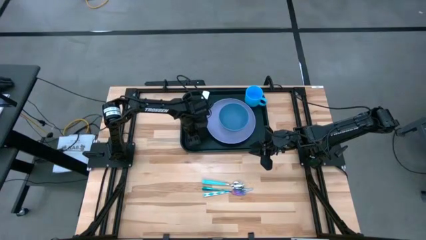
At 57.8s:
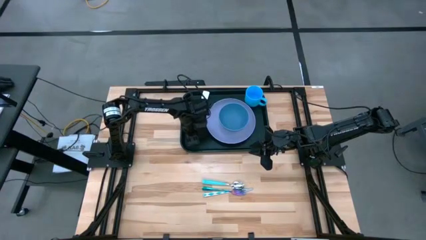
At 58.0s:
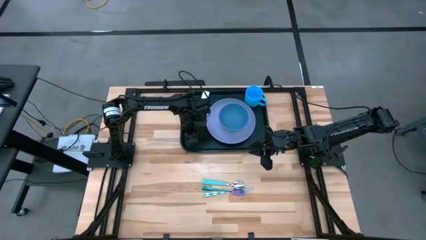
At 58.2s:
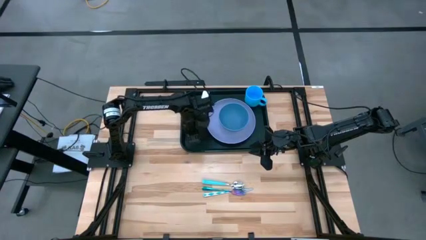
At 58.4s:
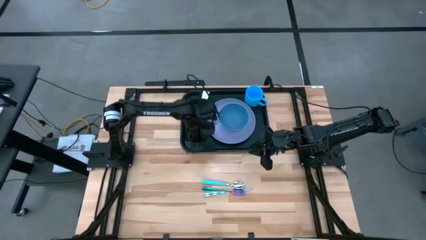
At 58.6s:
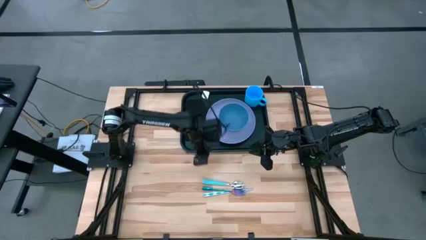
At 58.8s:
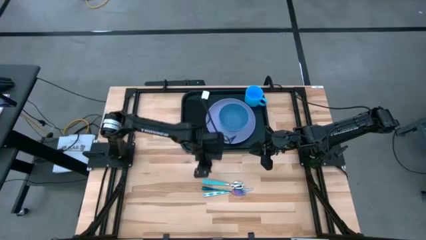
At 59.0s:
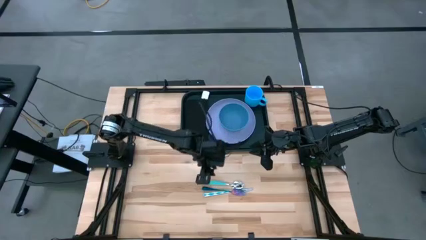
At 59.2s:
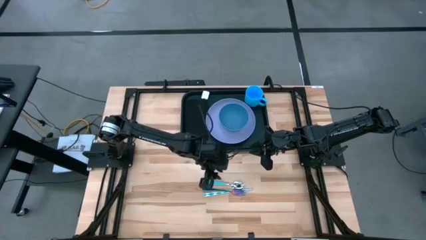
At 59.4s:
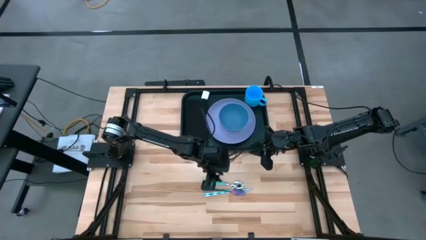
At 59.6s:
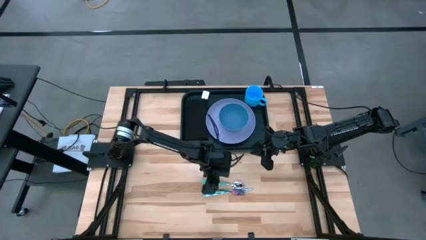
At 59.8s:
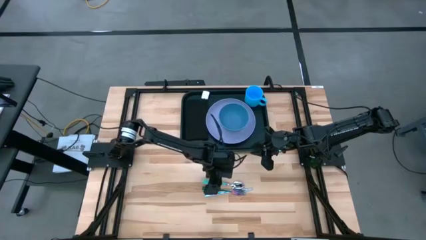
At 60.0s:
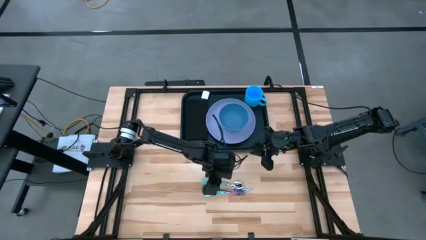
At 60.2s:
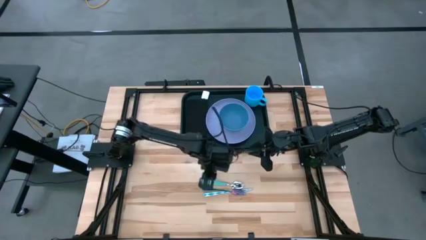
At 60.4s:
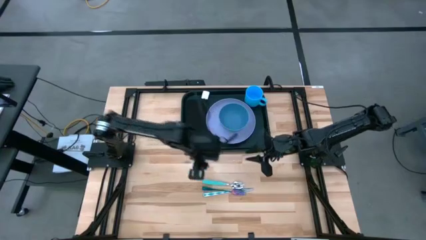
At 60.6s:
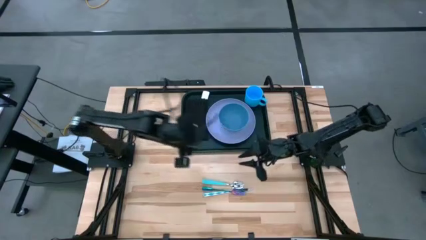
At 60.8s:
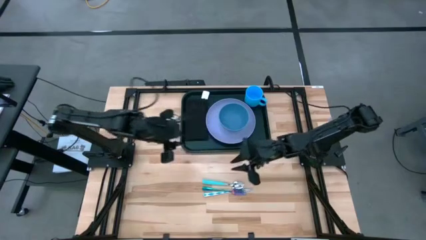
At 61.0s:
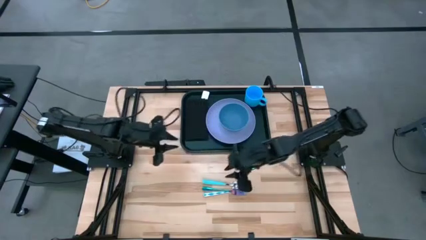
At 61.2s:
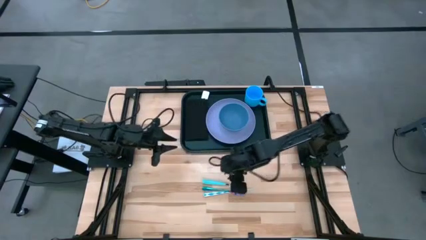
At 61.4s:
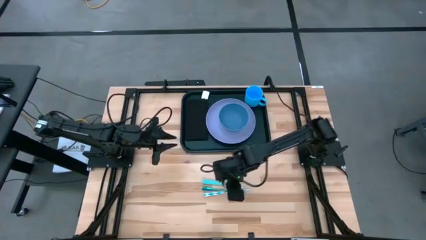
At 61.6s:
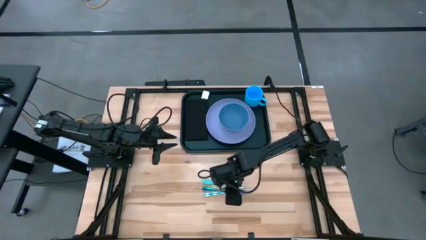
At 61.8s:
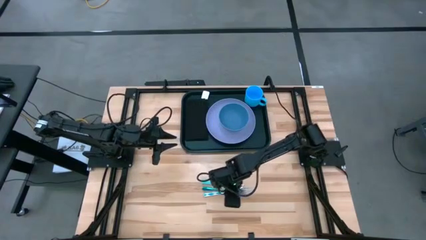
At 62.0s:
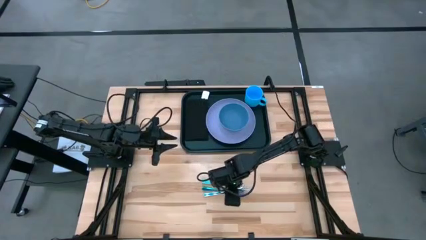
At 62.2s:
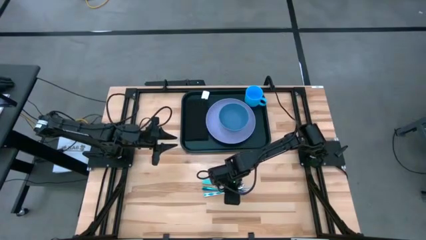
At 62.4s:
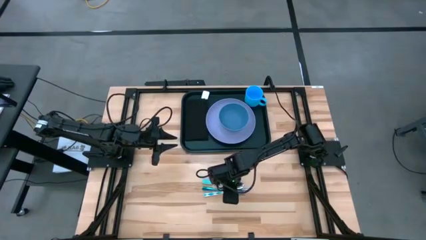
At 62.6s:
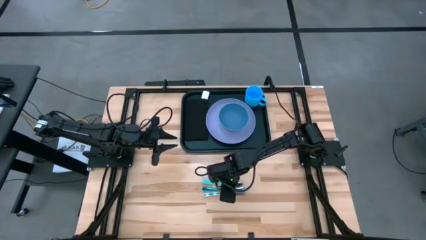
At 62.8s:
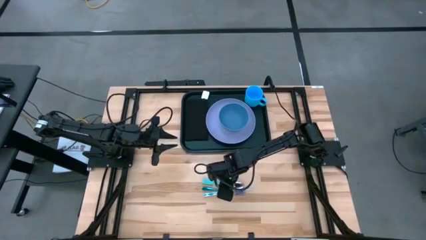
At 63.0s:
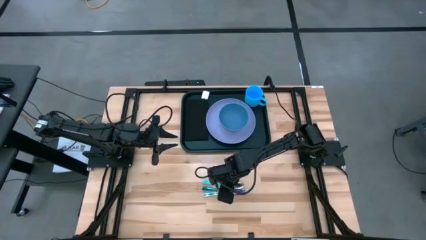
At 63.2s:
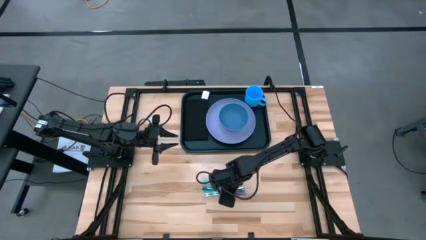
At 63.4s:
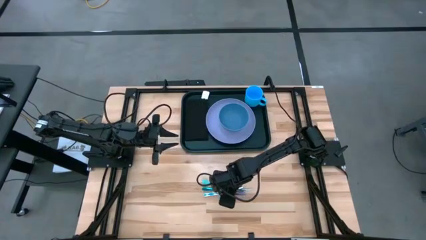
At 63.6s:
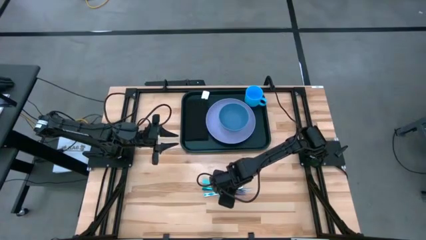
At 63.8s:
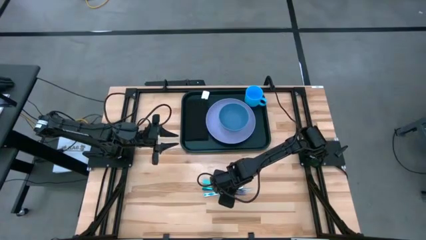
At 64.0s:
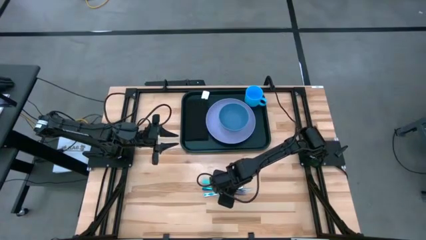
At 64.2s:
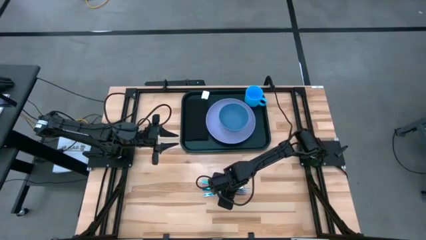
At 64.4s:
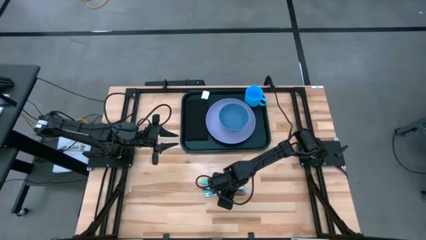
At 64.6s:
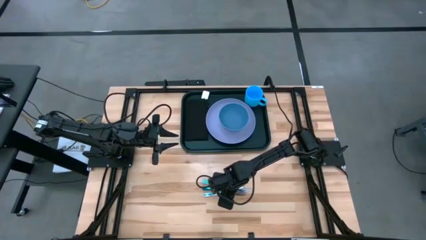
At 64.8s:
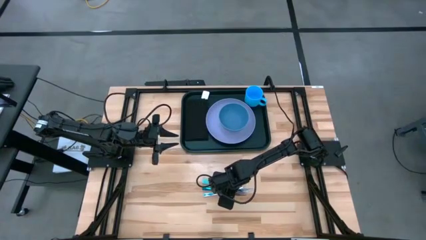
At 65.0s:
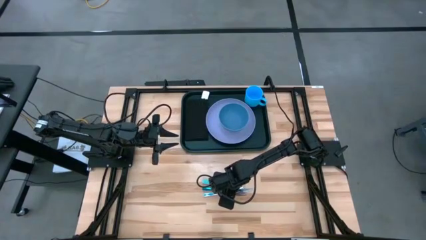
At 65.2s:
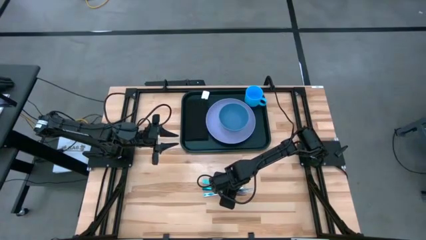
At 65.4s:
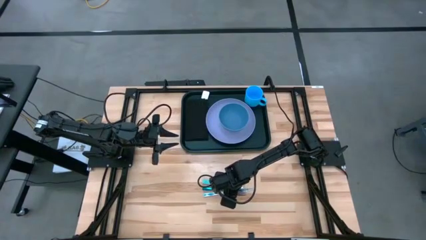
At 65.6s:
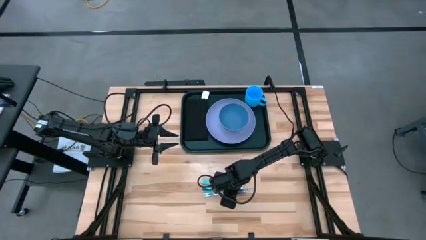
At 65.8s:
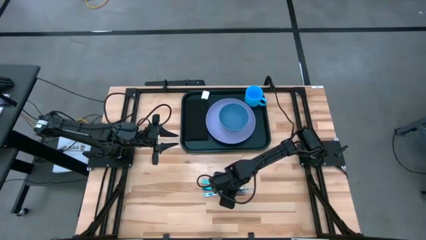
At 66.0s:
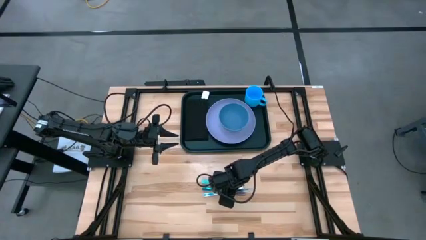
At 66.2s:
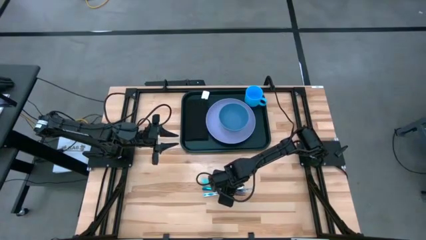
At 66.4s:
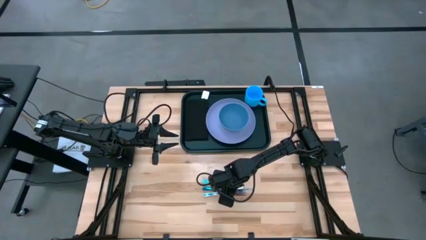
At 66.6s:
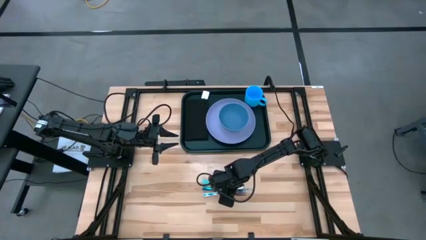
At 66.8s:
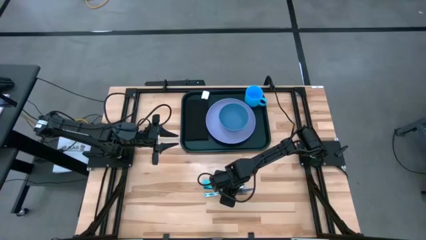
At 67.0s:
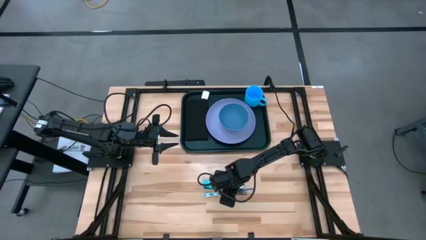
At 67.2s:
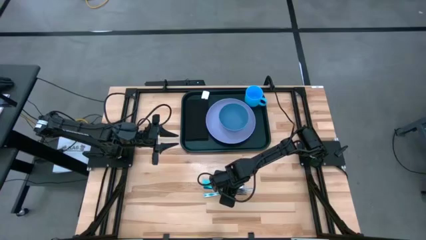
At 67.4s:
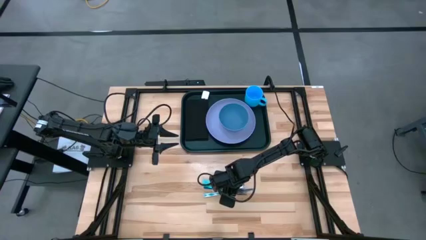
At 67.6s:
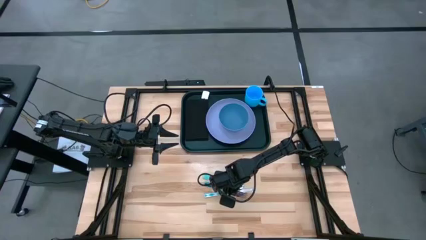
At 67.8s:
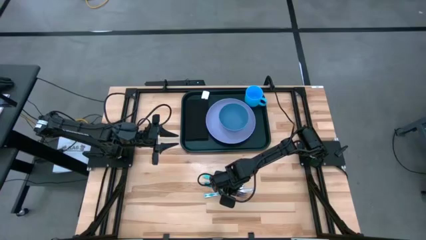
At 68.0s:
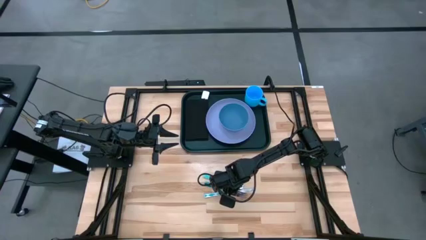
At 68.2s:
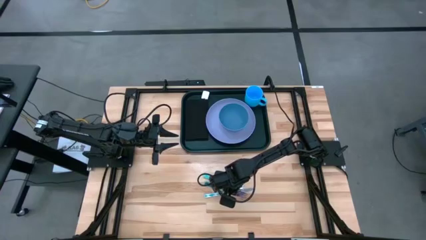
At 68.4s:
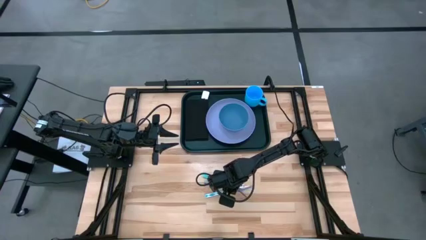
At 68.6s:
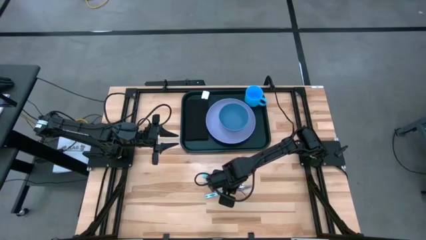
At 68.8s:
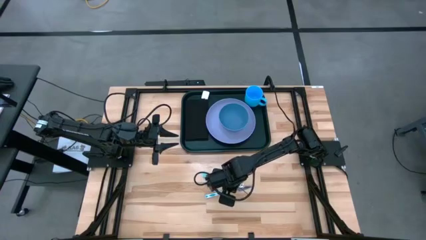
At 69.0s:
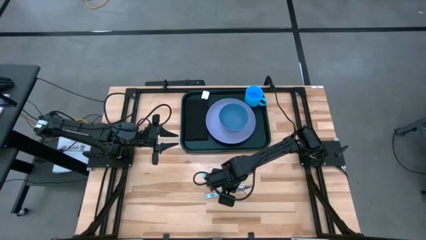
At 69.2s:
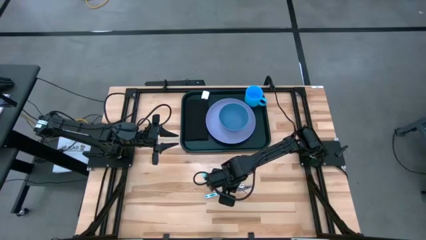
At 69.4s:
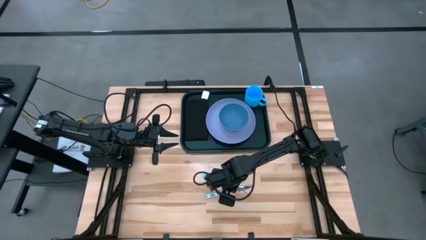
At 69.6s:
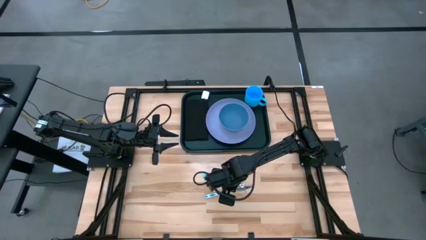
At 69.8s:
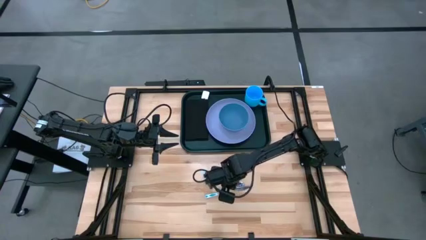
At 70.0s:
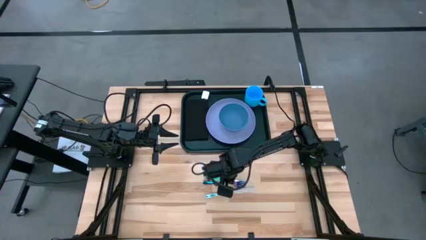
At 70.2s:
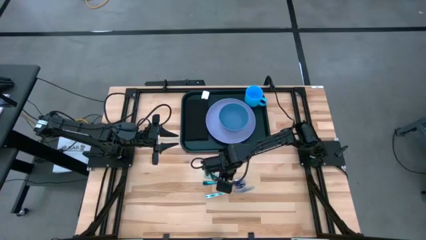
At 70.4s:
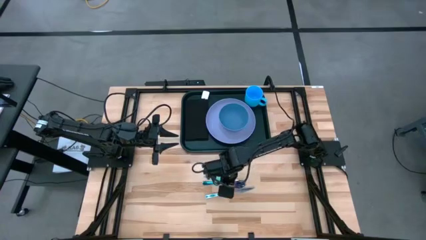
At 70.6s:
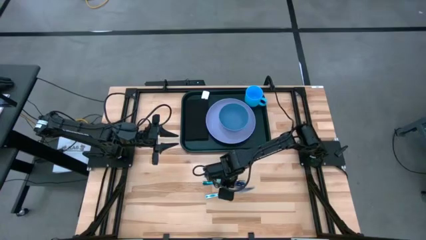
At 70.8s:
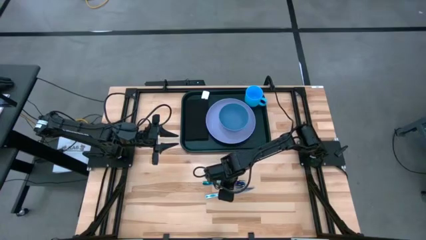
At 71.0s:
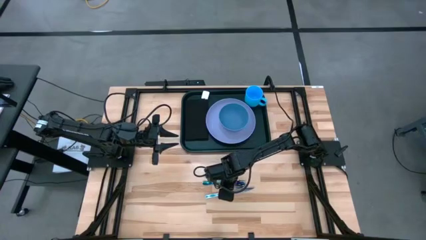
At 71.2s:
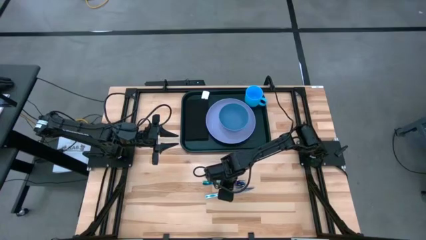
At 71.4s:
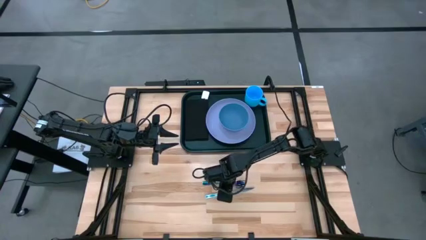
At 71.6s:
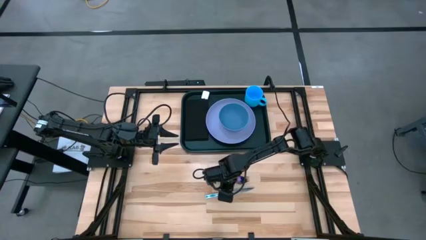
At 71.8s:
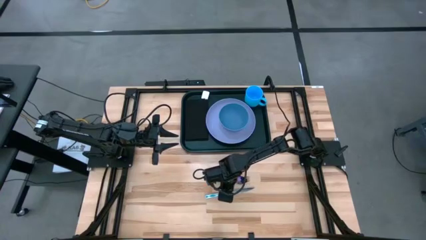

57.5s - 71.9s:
Task: Set up tray
Put the blue fork on the black napkin on the black tray
